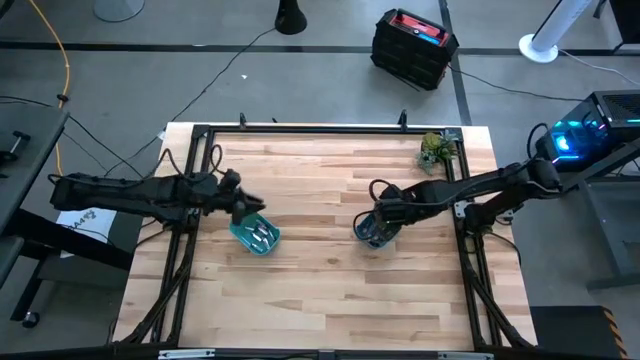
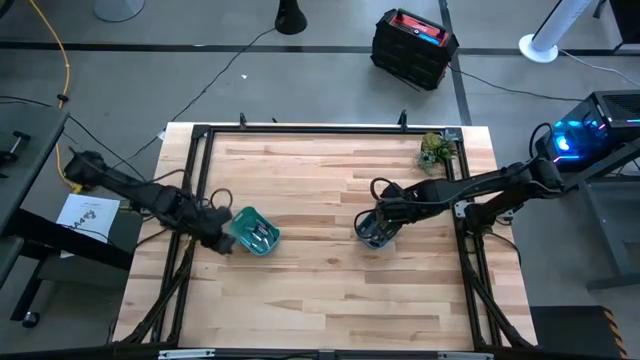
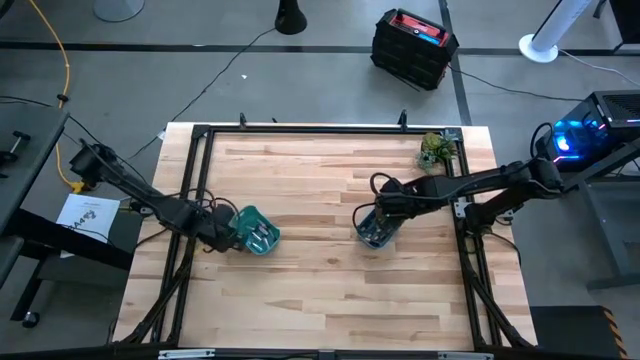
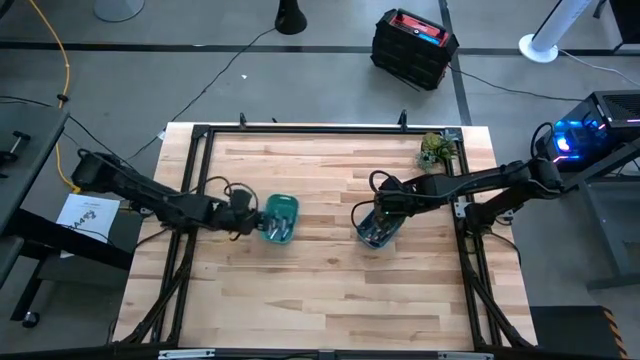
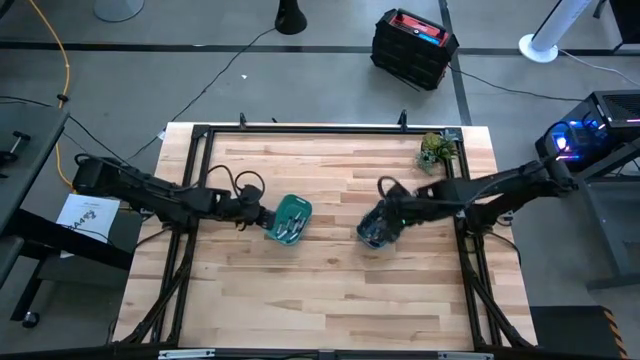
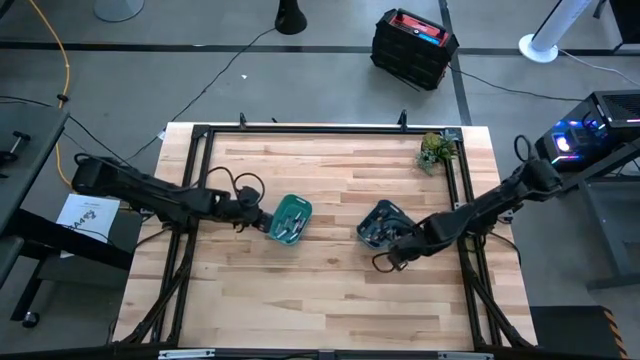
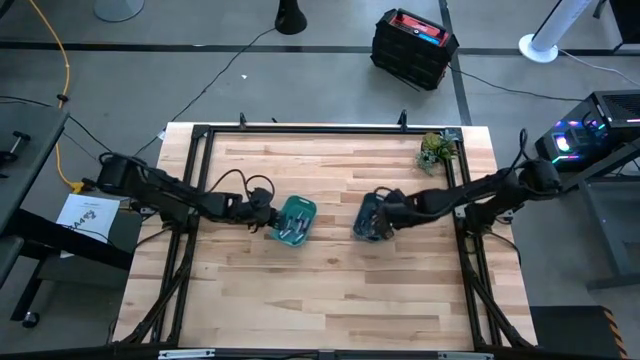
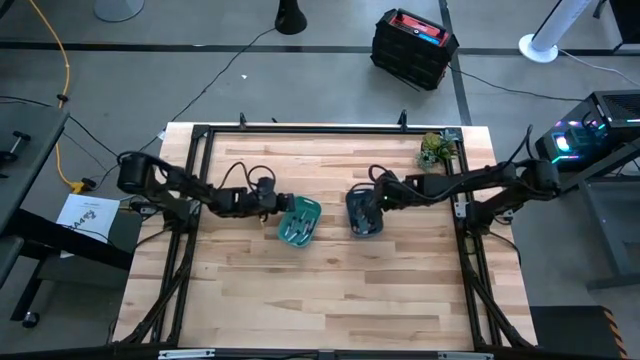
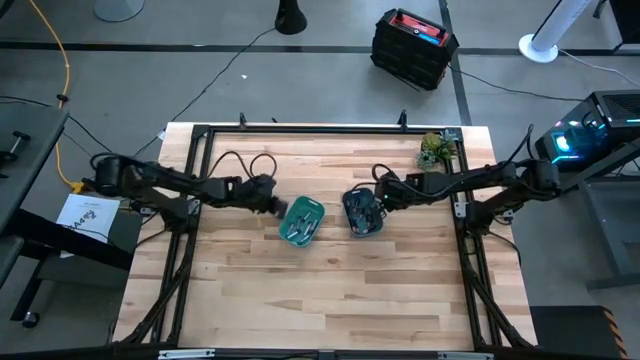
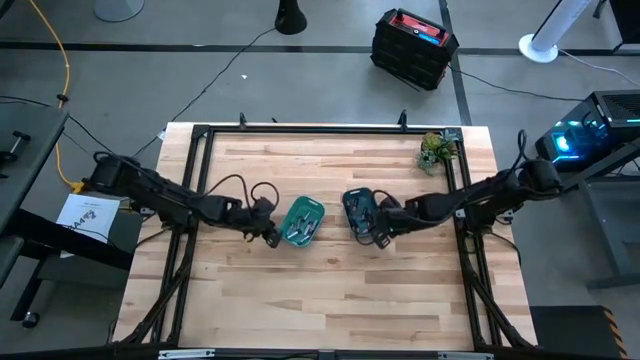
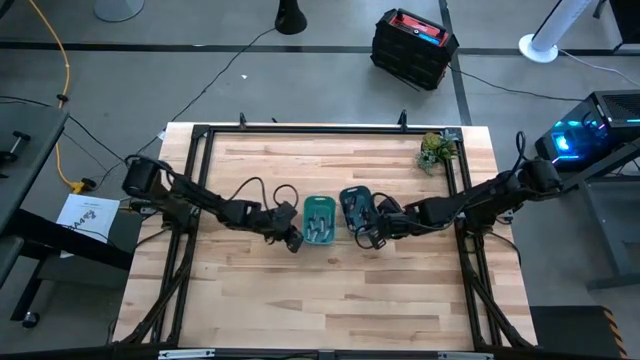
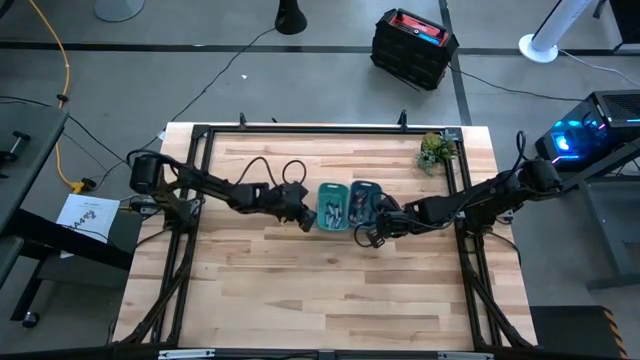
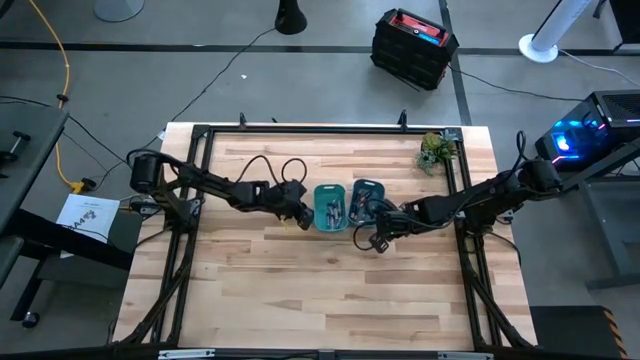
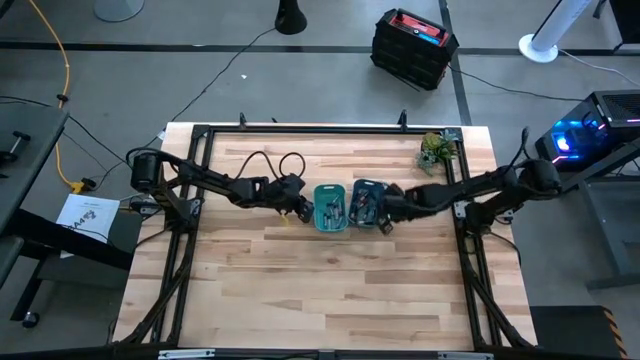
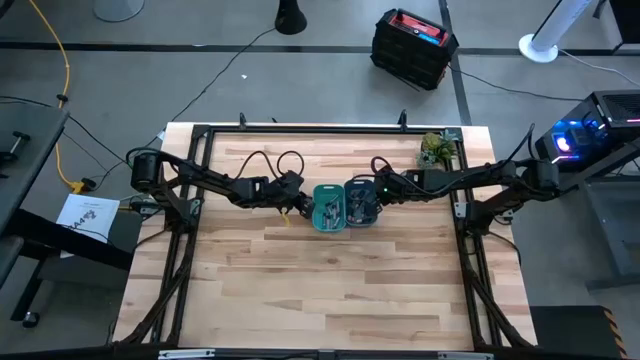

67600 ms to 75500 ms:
Task: Sort batteries
Adjust the bins to the center of the table

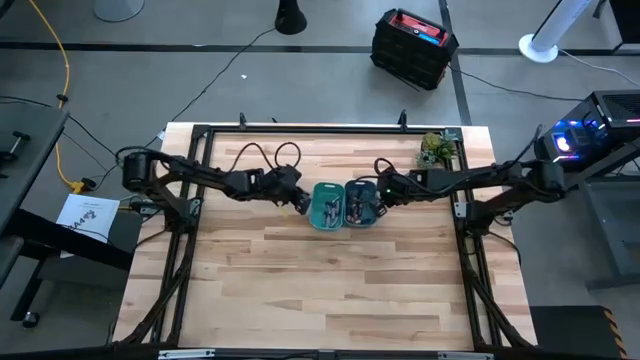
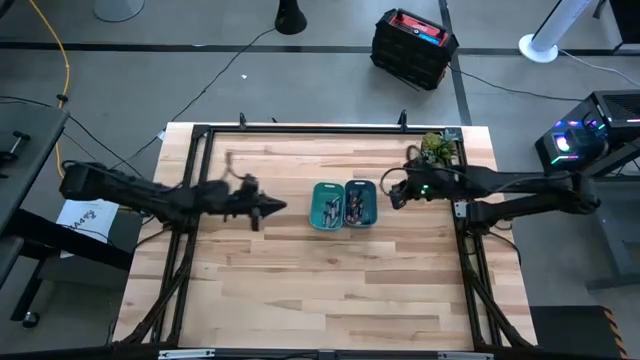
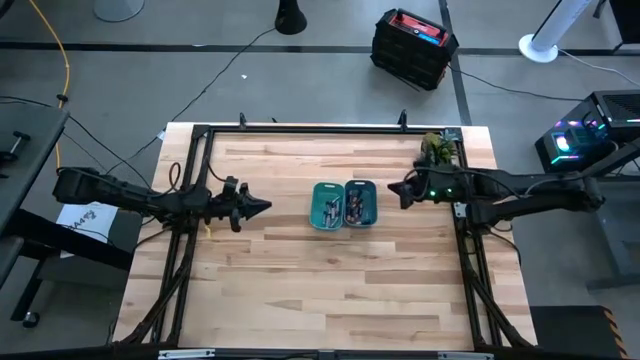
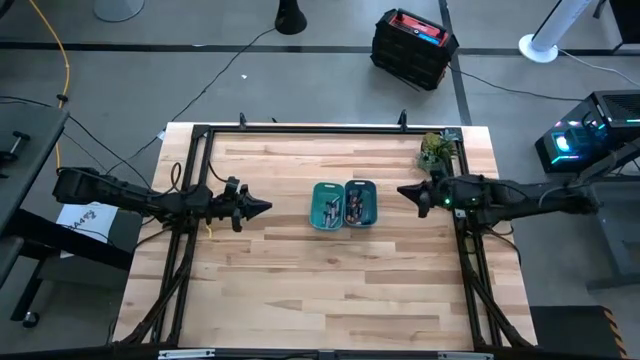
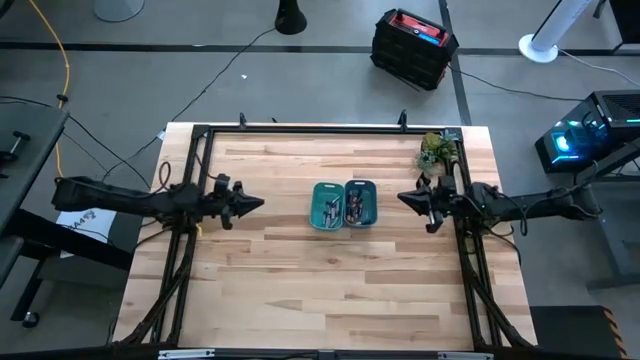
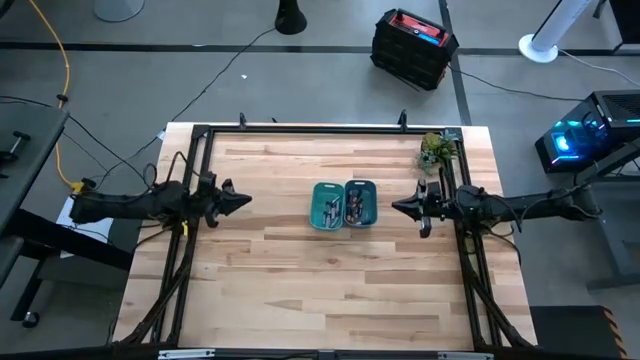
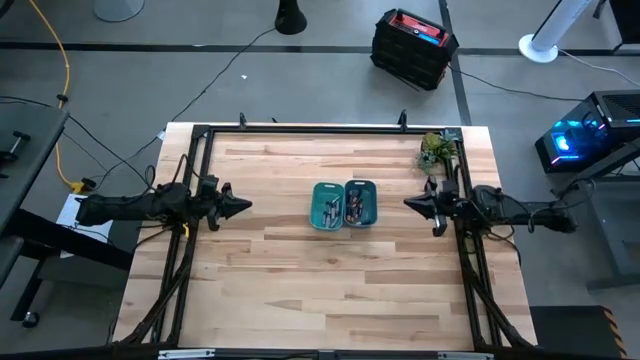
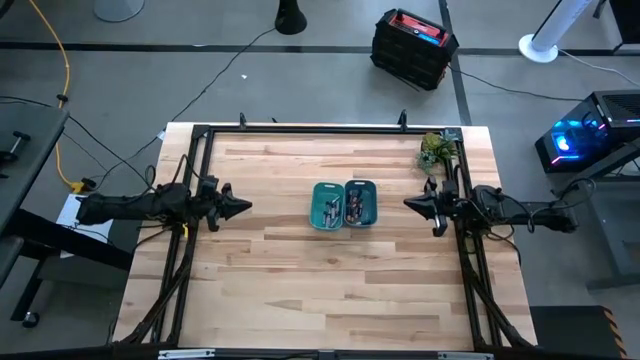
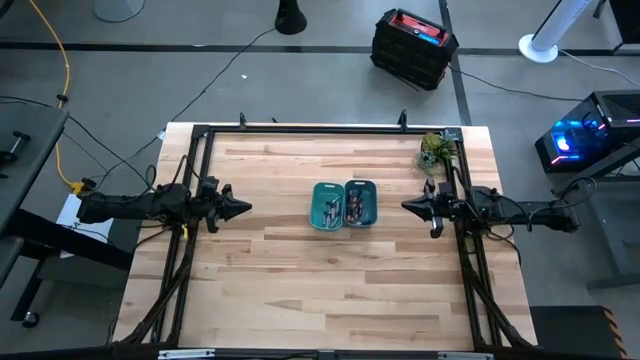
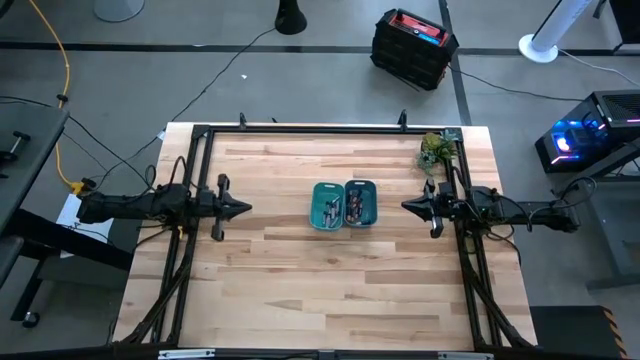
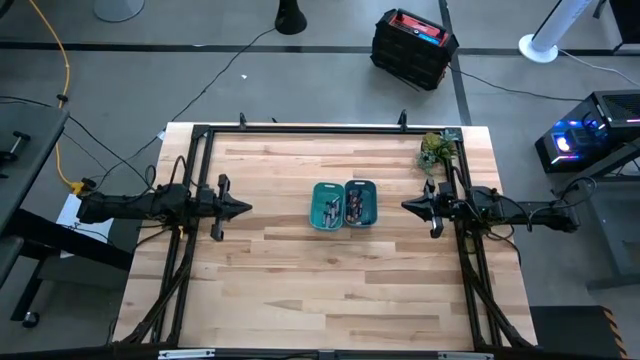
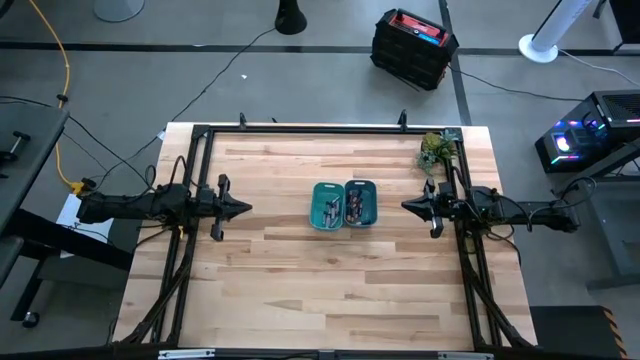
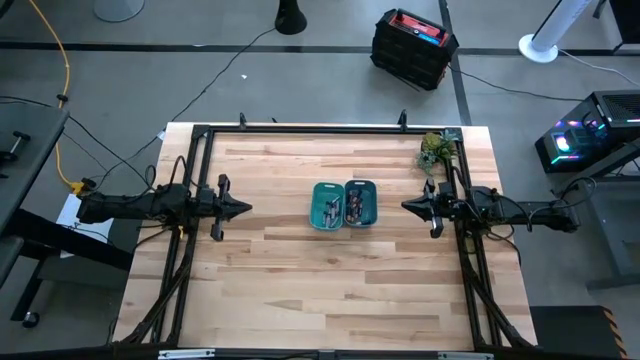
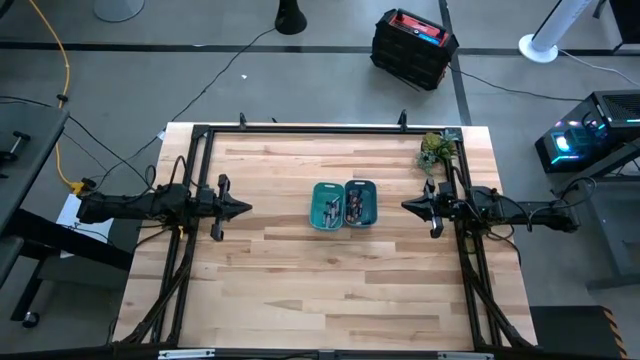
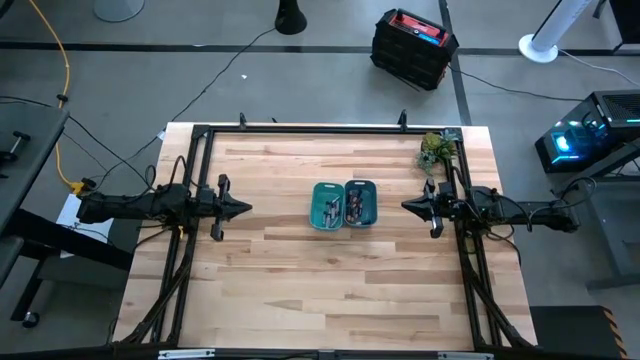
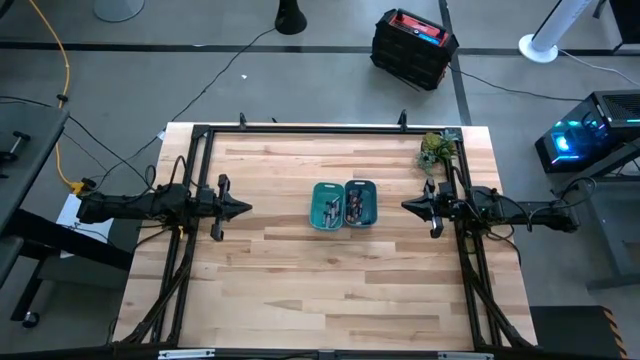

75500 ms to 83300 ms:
Return to Home Position

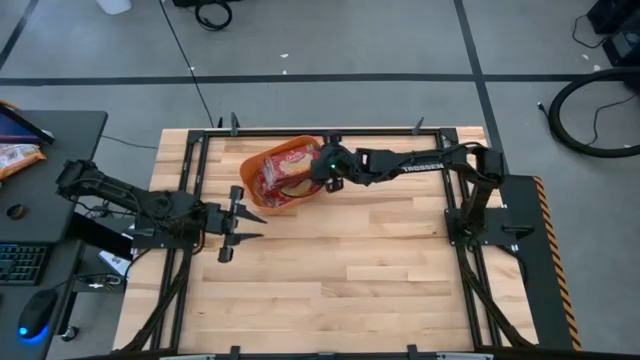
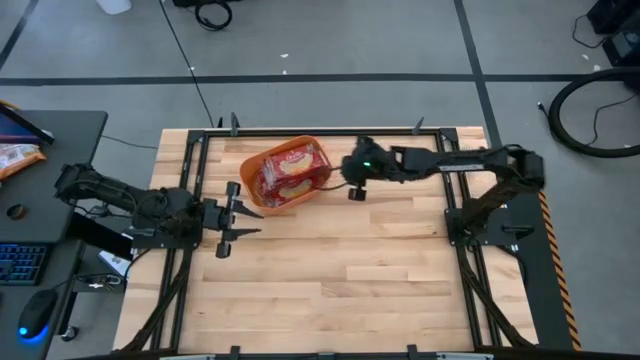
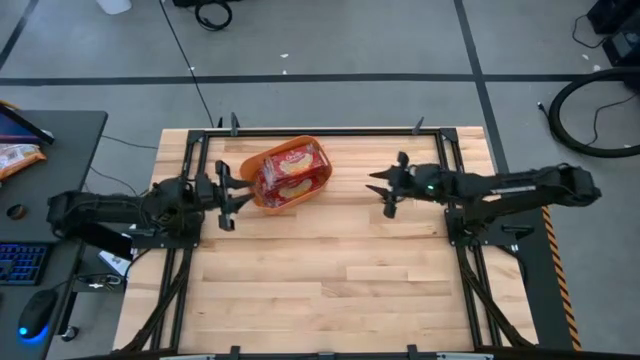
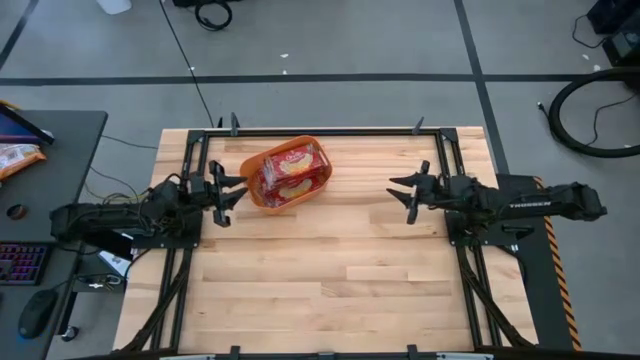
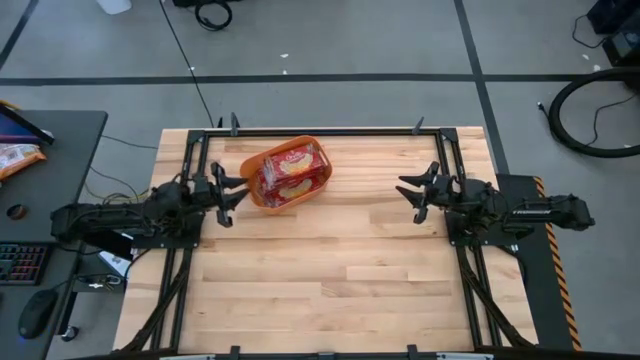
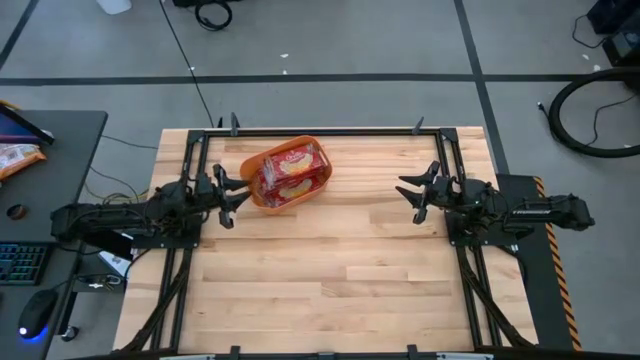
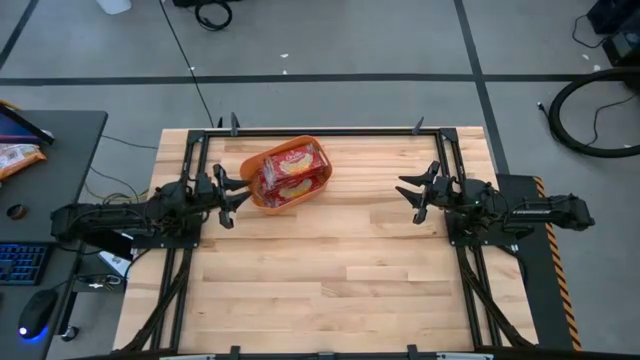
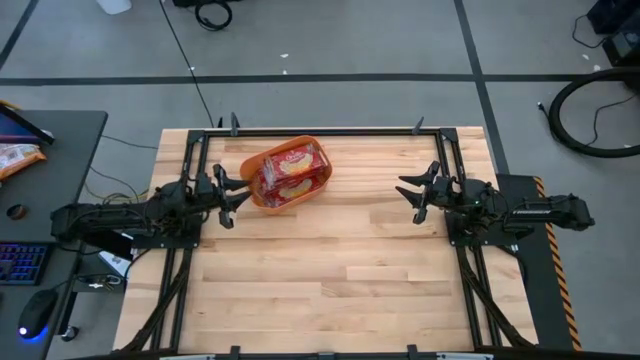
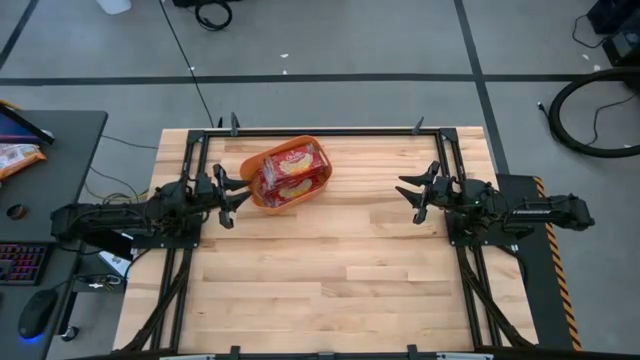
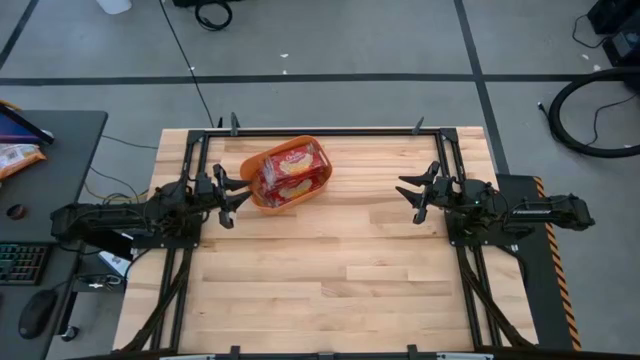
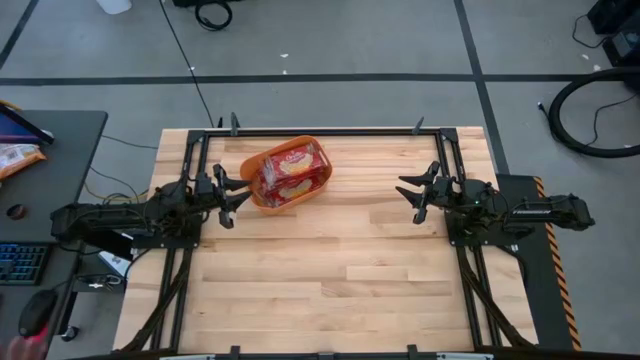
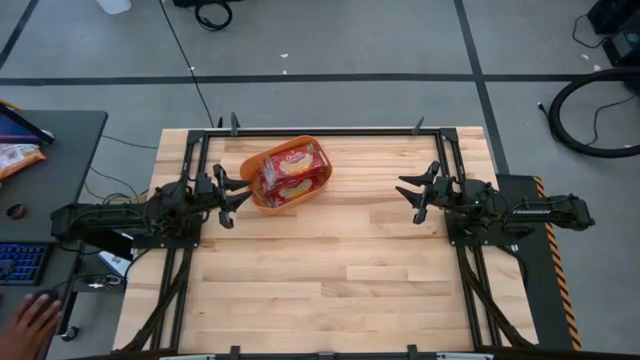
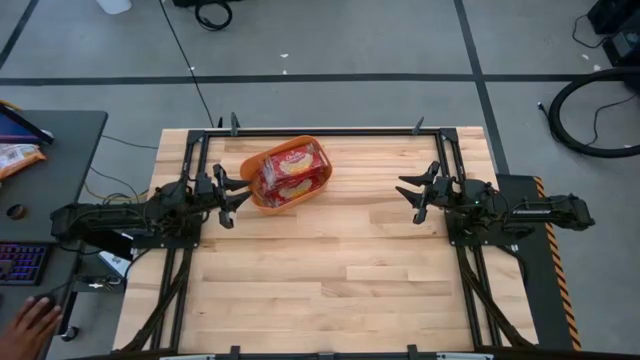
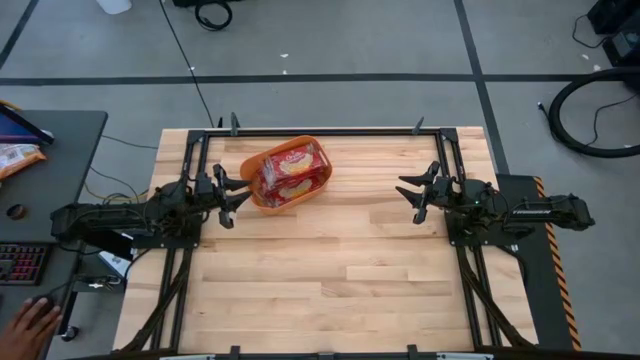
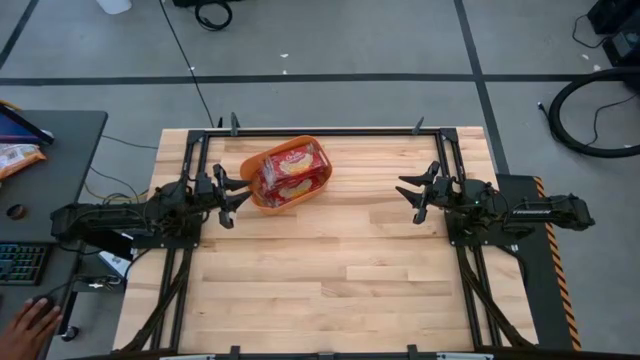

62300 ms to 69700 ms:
Task: Sort popcorn bags into baskets
Return to Home Position
